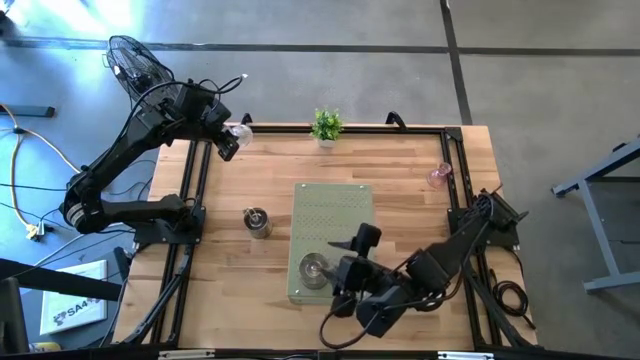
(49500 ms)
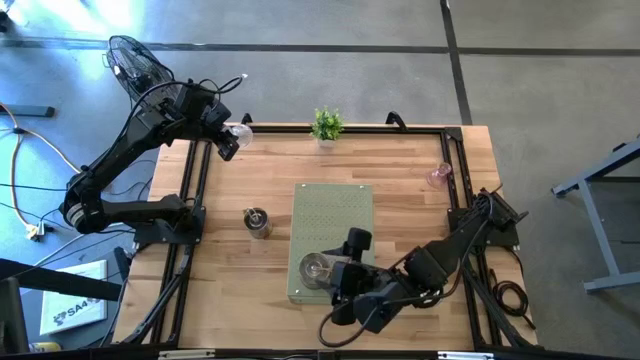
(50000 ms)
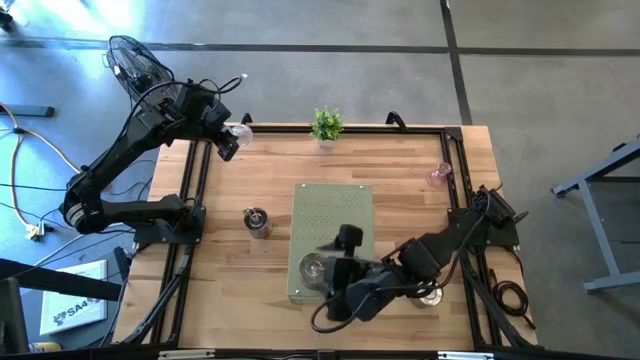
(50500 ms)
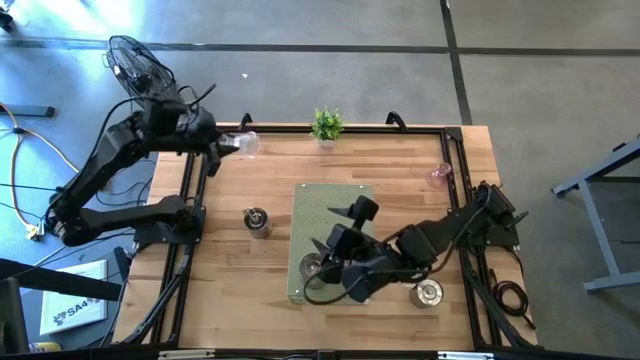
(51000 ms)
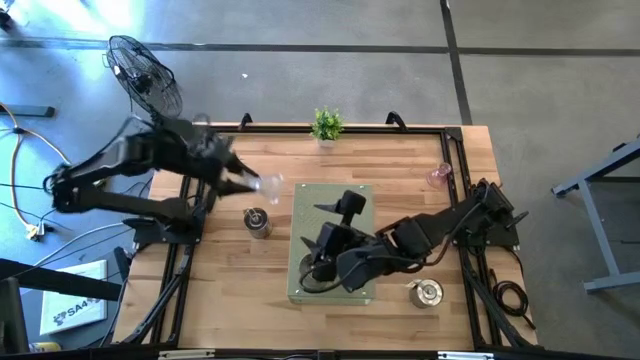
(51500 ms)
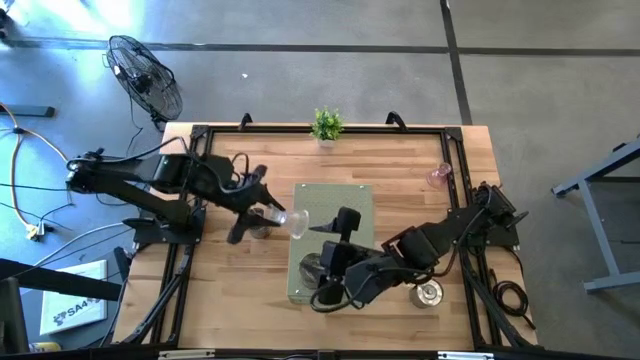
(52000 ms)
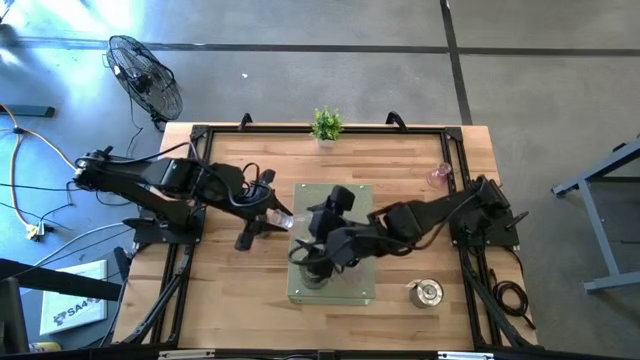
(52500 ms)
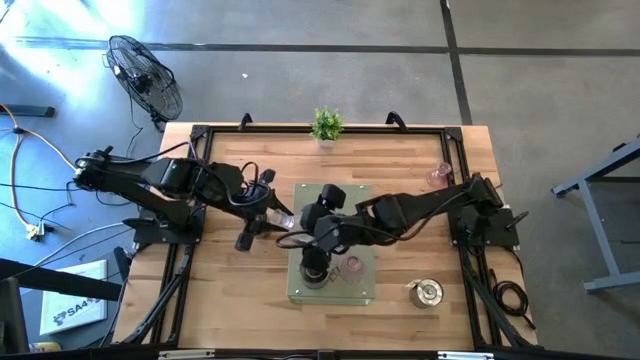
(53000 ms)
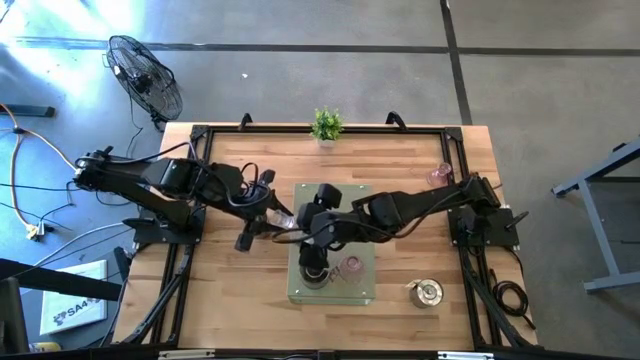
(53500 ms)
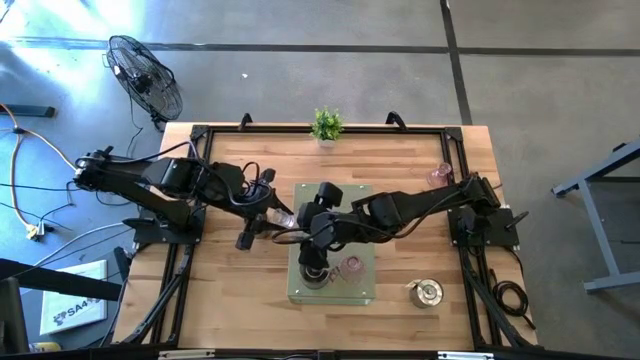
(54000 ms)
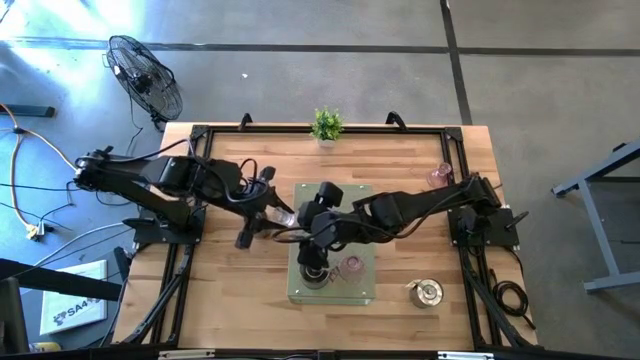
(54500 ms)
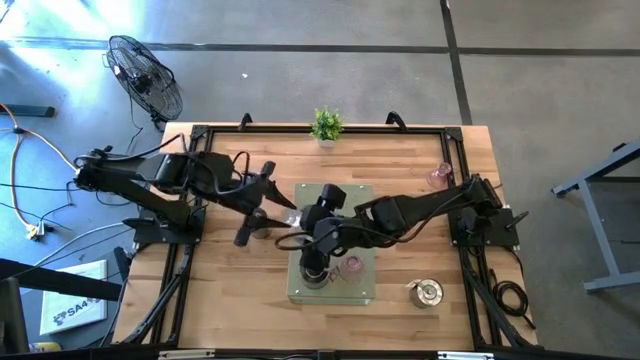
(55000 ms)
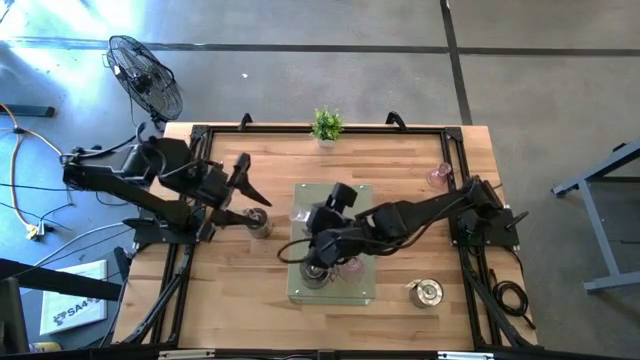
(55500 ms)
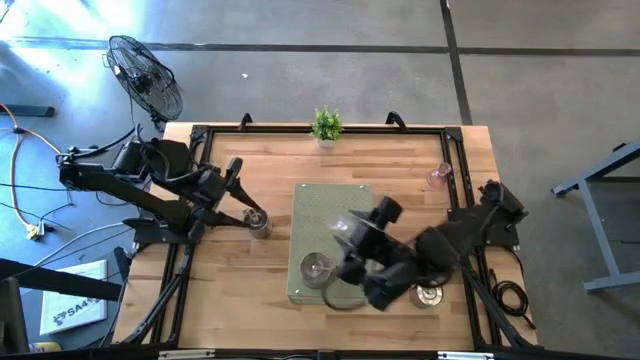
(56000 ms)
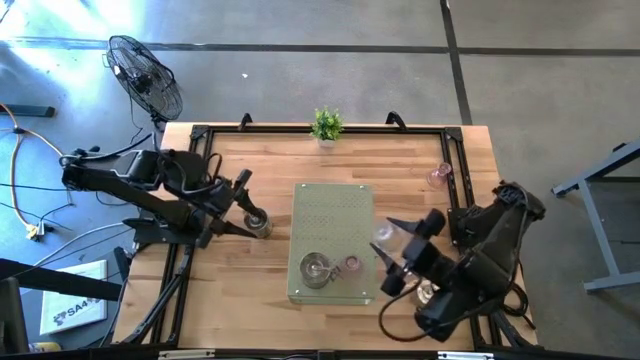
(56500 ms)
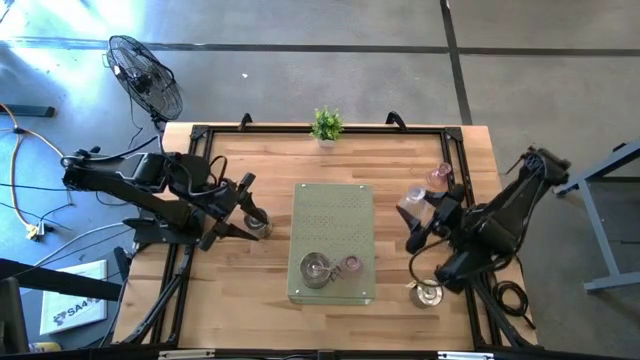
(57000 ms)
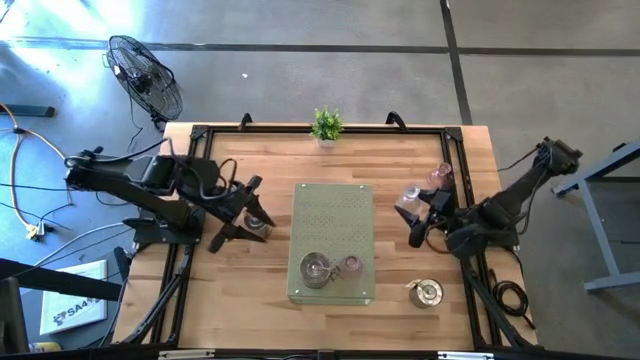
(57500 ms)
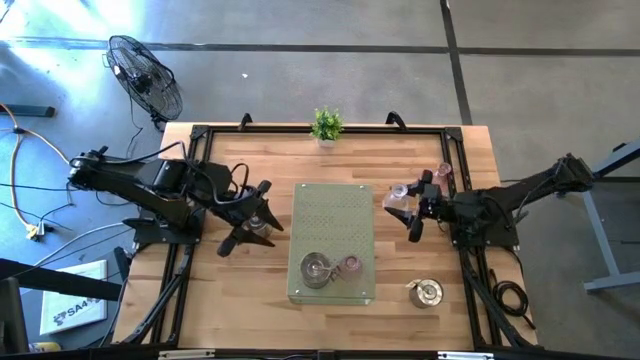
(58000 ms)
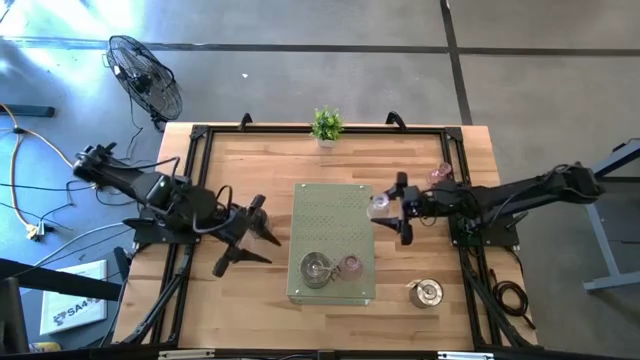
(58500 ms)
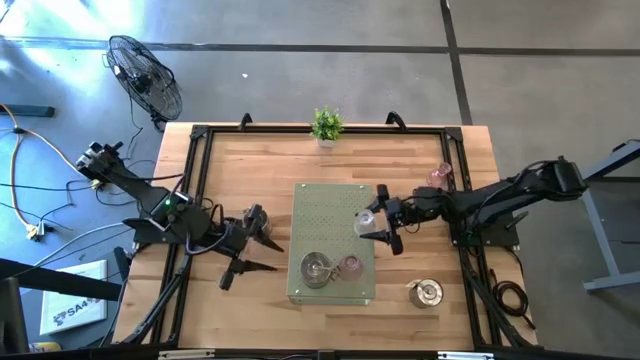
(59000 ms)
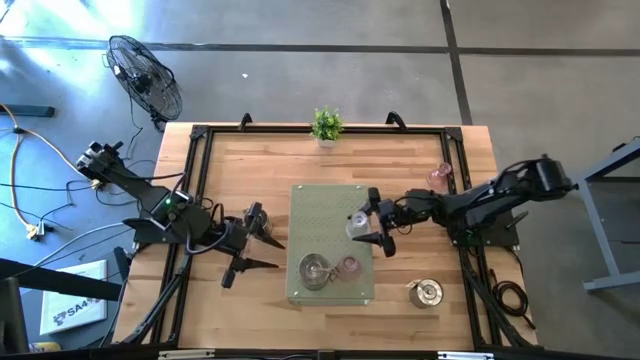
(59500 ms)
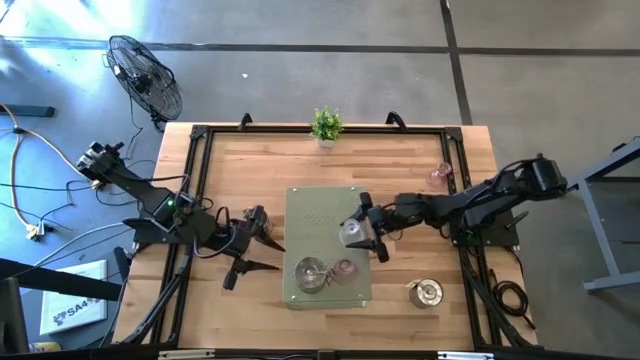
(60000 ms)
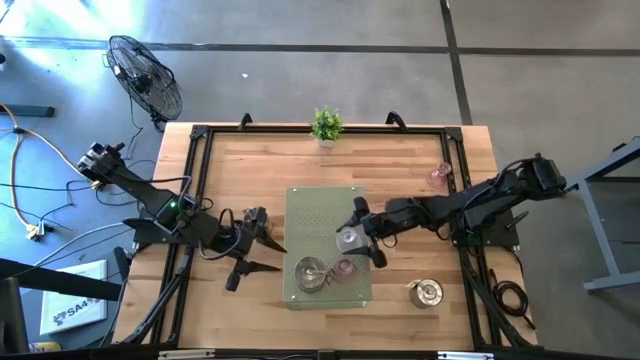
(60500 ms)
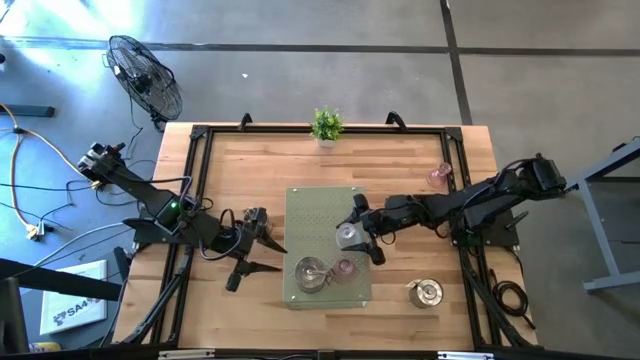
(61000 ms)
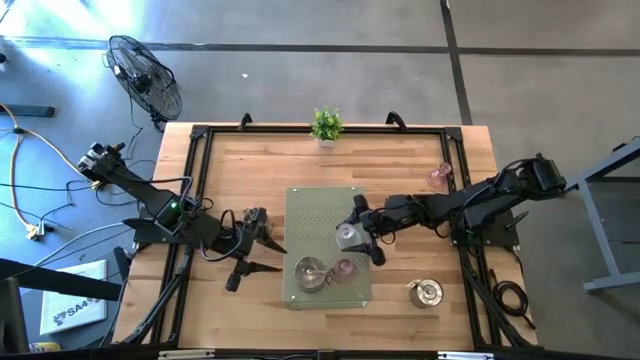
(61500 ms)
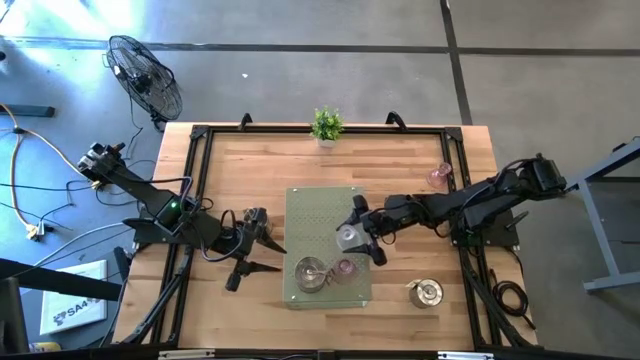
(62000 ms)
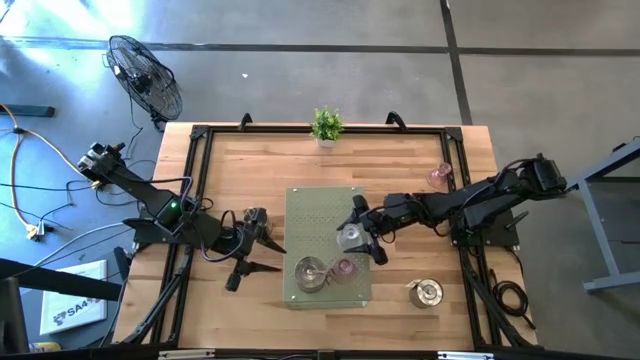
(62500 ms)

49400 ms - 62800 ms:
Task: Pick & Place candle stick holders
Put the transparent candle holder on the shelf
